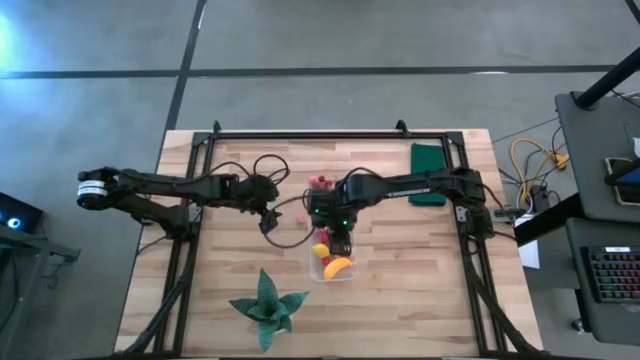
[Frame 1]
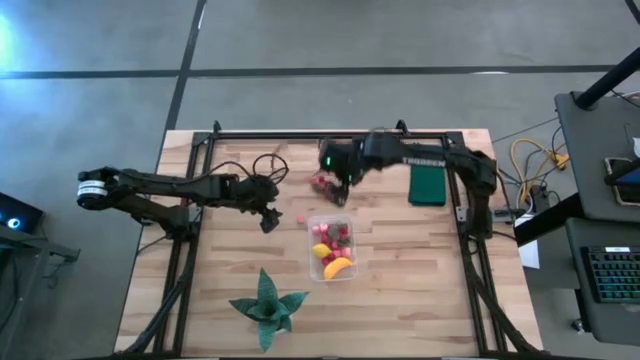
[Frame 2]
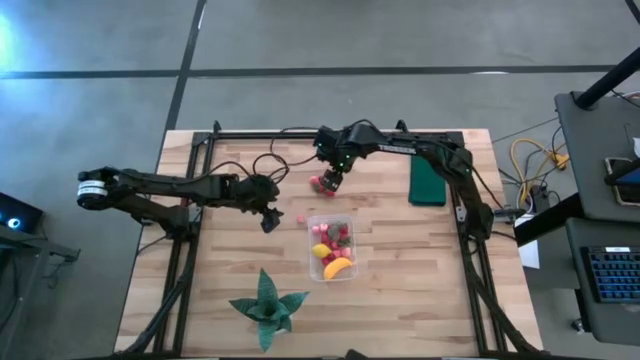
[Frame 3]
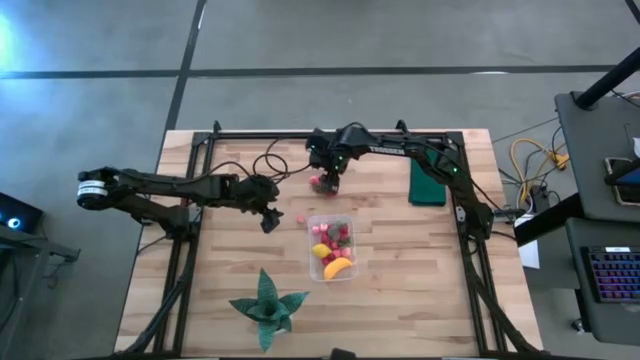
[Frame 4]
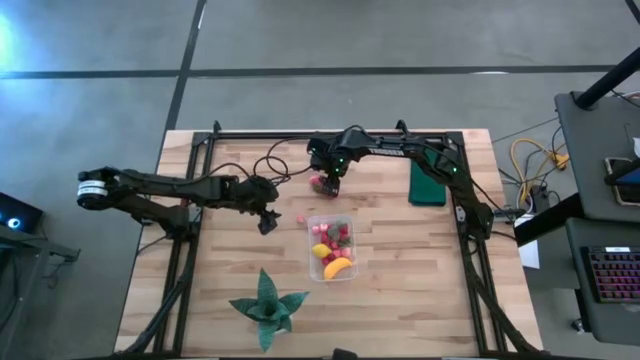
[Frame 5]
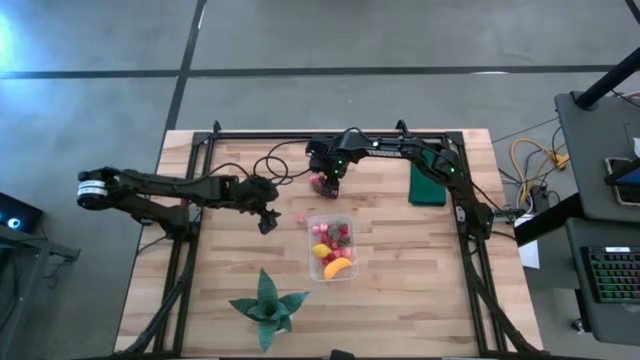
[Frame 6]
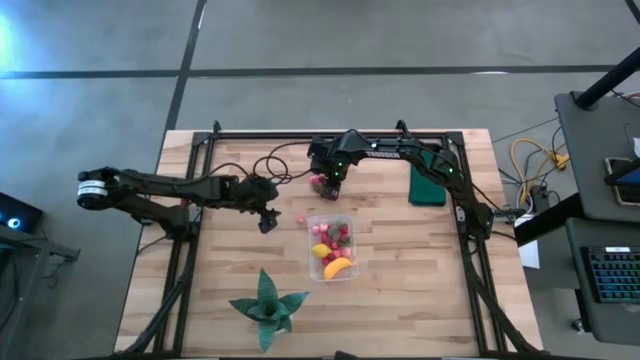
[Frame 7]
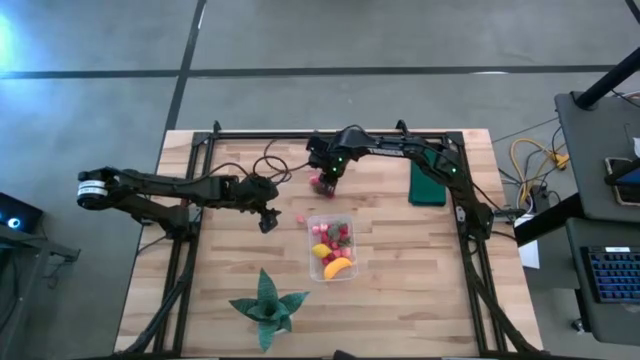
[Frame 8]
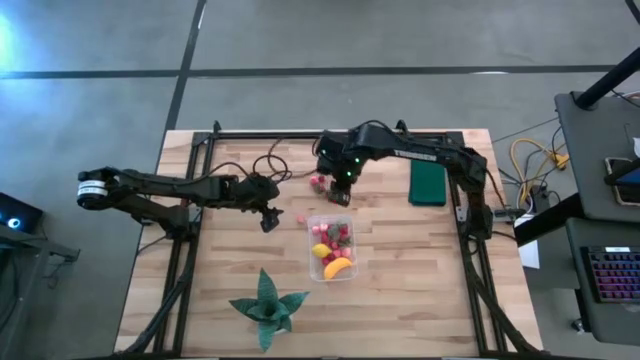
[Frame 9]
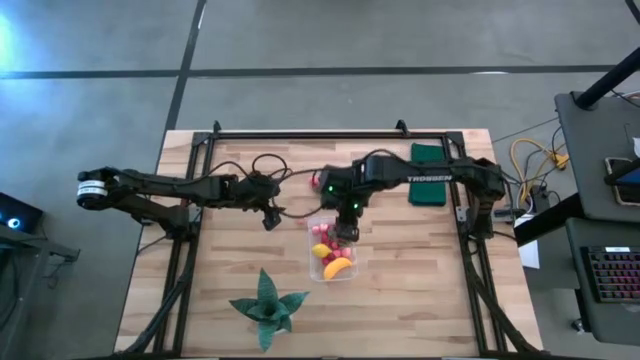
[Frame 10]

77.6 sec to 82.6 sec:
Task: Pick and placing Produce into tupperware
Put the cherry into the transparent bin

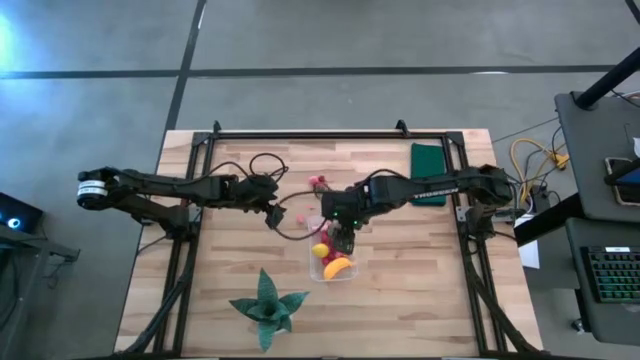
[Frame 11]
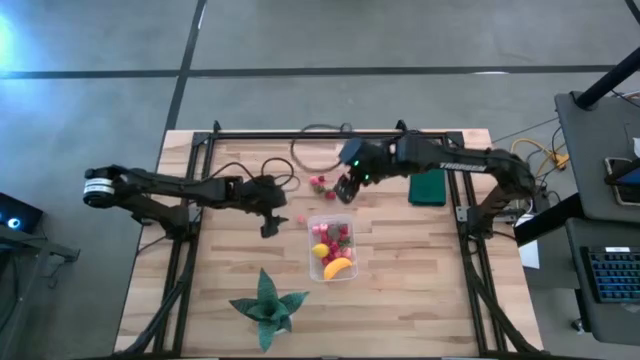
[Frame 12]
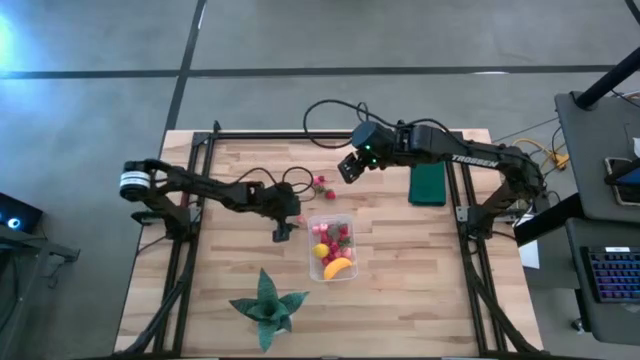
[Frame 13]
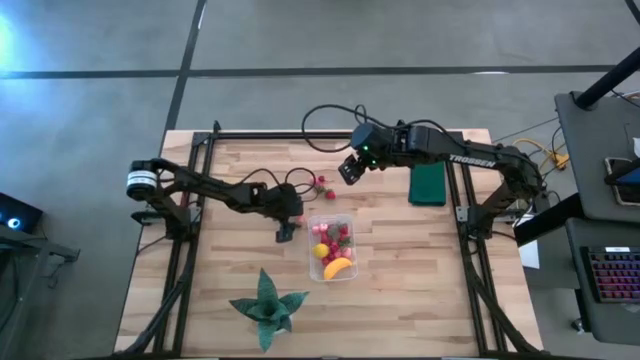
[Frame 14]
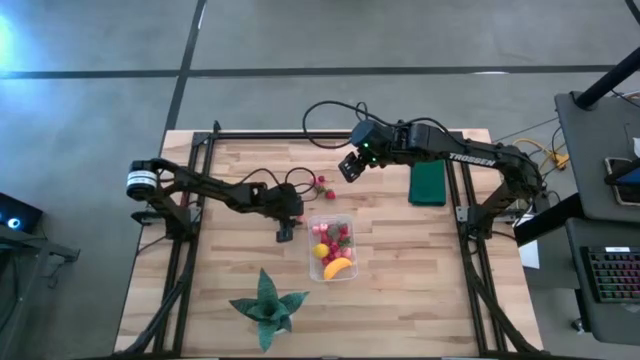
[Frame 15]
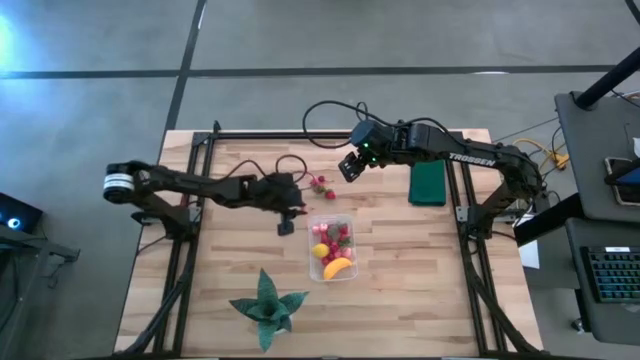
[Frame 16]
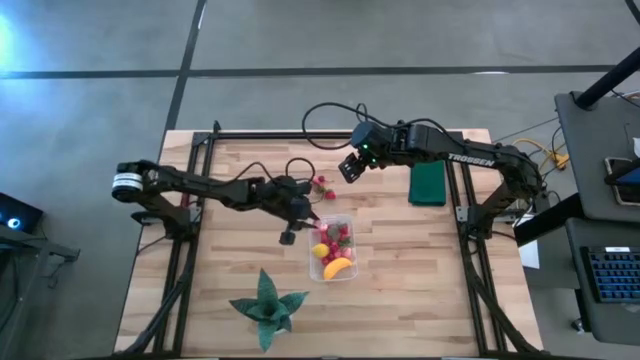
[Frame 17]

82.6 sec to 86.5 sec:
Put the apricot into the transparent bin

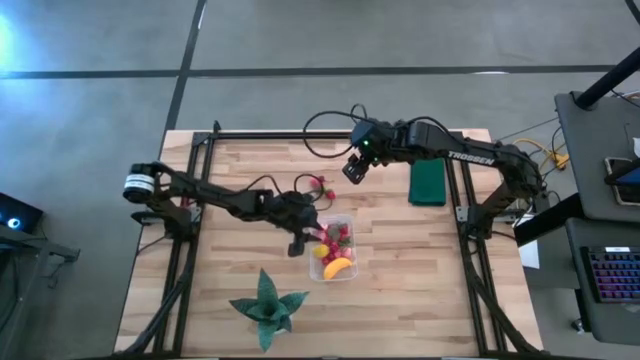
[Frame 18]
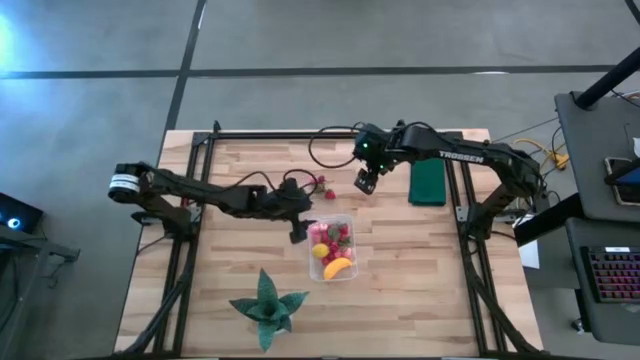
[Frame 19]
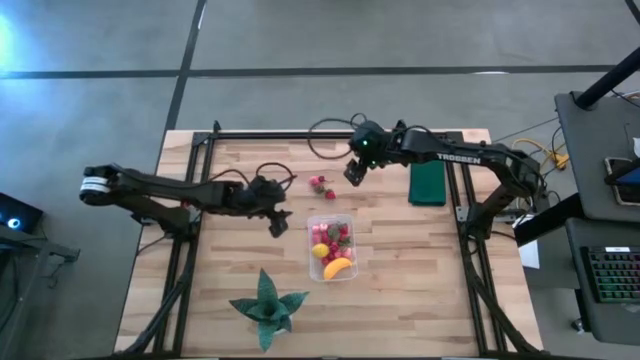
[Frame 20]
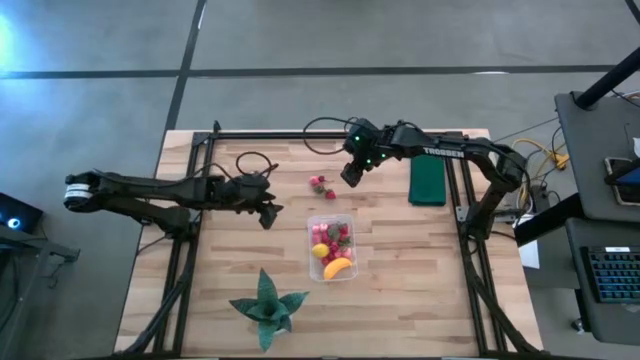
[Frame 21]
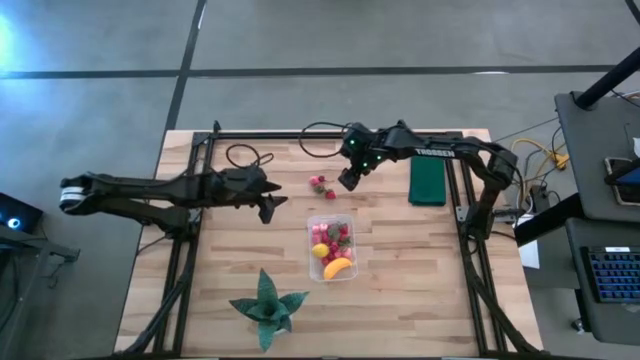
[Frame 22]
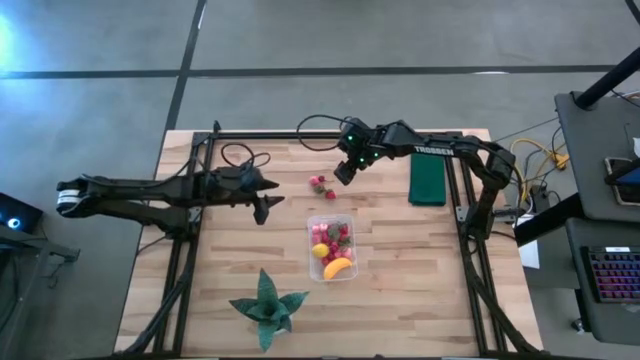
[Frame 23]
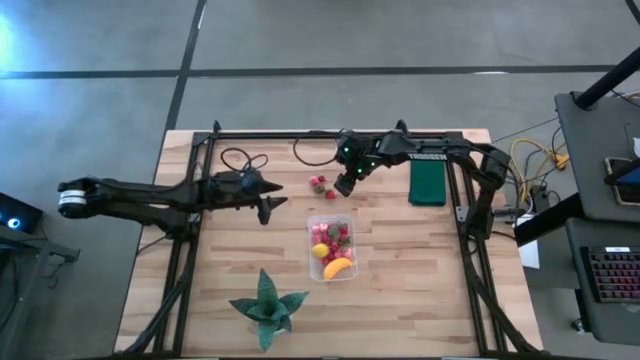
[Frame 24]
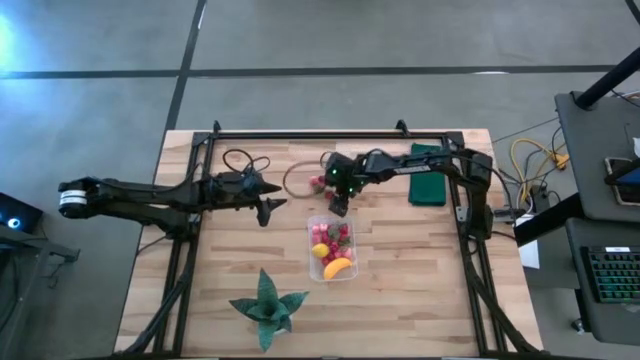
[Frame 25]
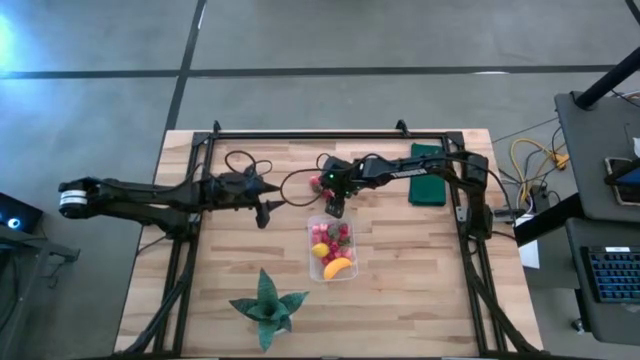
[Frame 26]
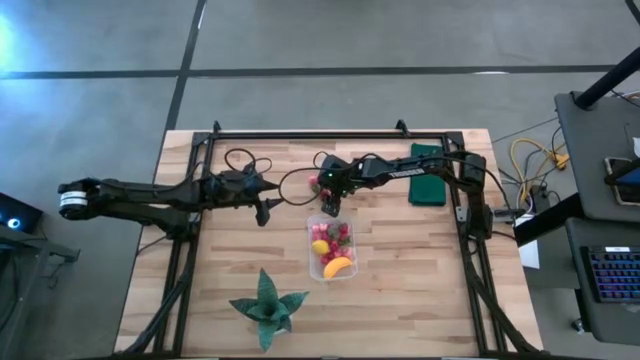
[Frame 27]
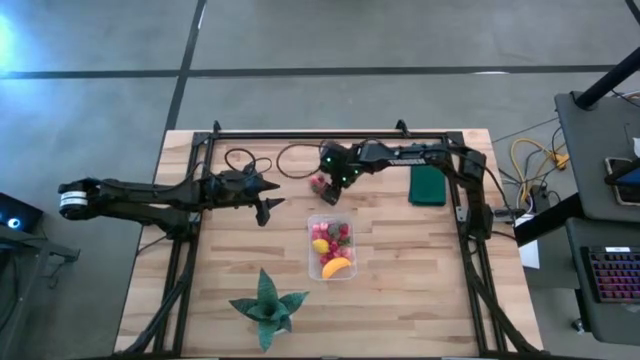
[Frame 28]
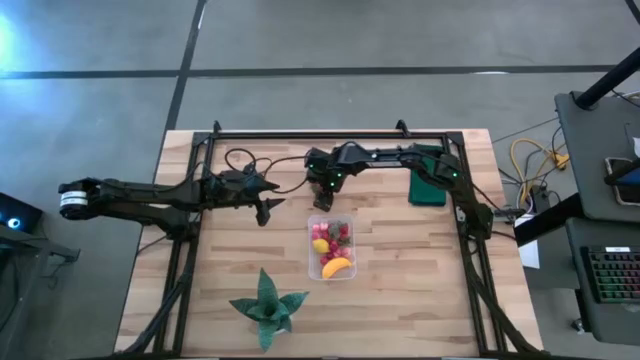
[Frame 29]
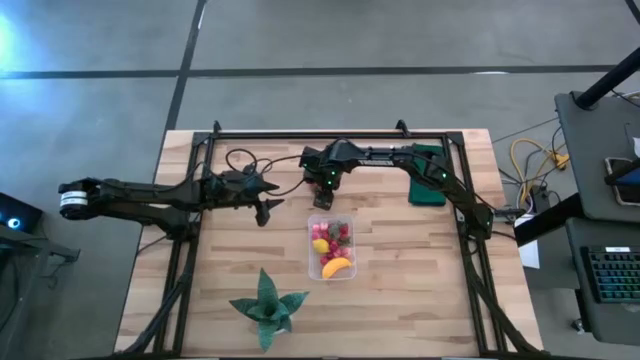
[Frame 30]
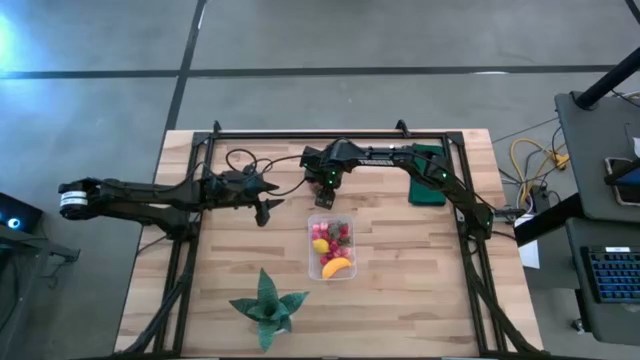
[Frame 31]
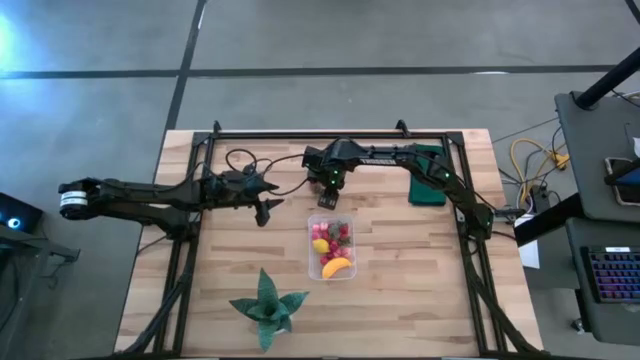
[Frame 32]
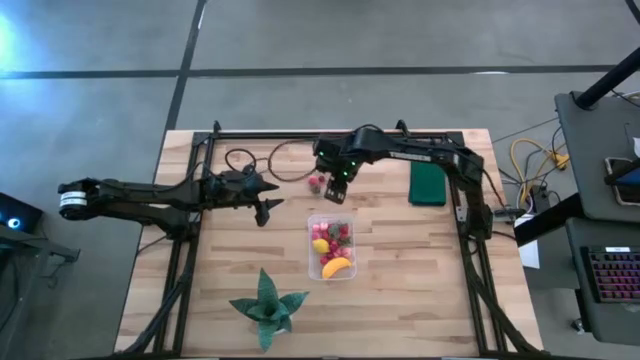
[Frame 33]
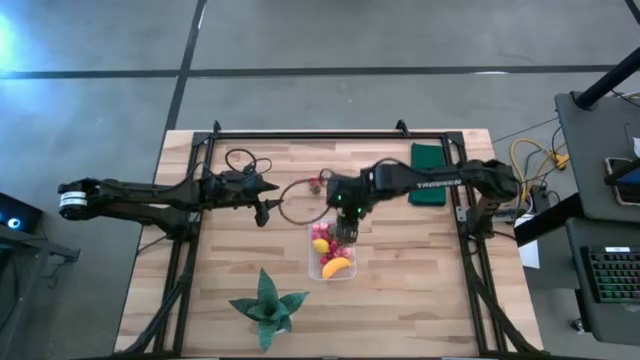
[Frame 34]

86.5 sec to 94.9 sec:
Put the strawberry into the transparent bin

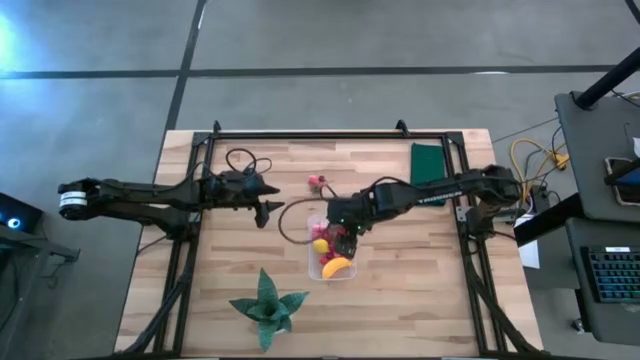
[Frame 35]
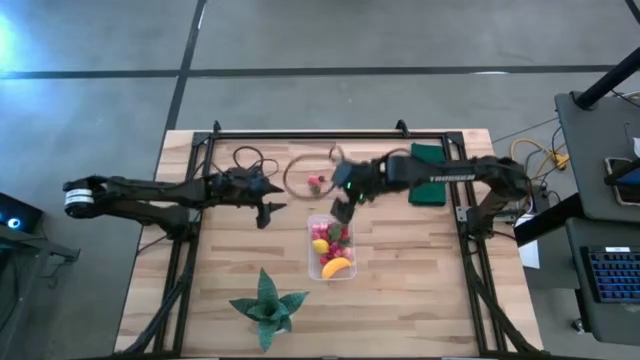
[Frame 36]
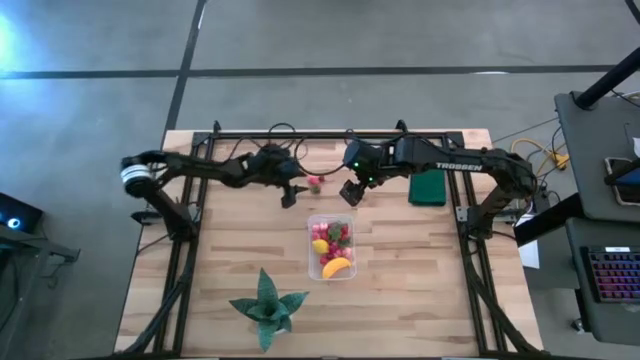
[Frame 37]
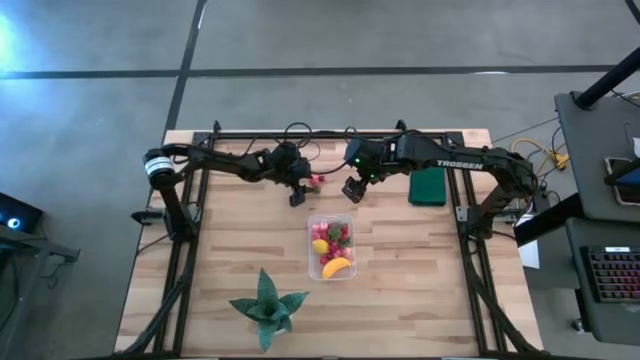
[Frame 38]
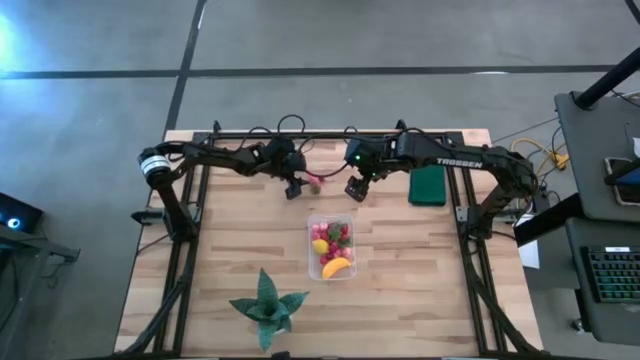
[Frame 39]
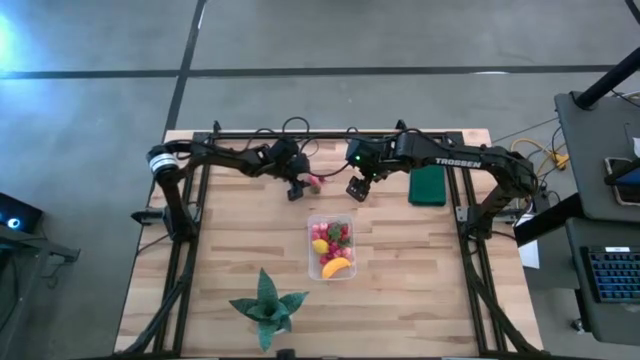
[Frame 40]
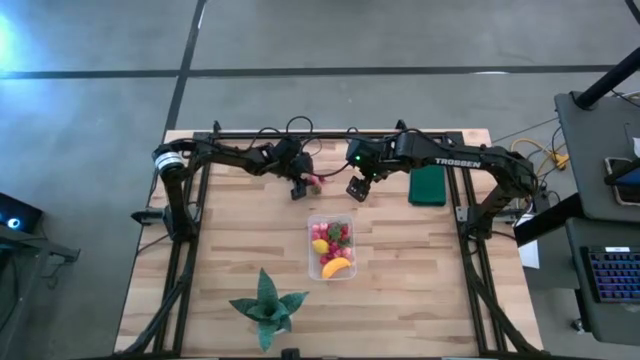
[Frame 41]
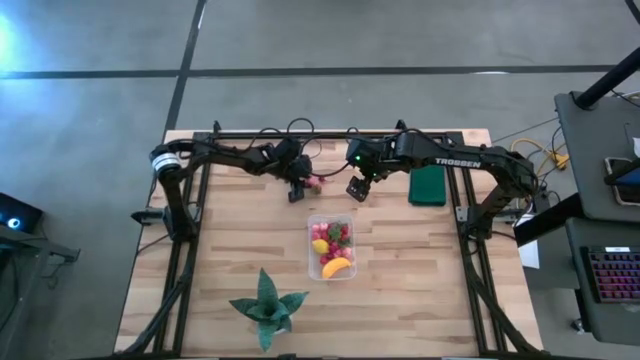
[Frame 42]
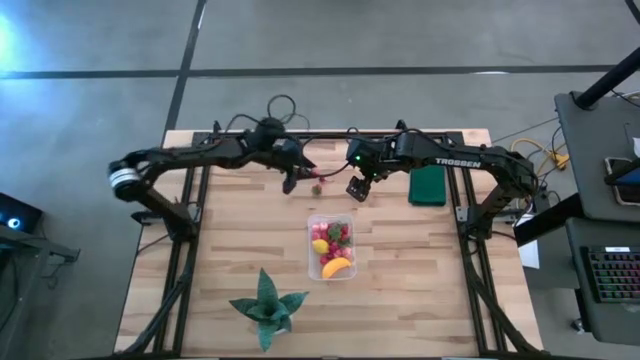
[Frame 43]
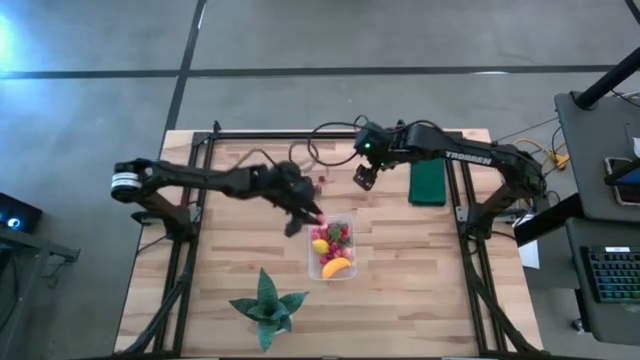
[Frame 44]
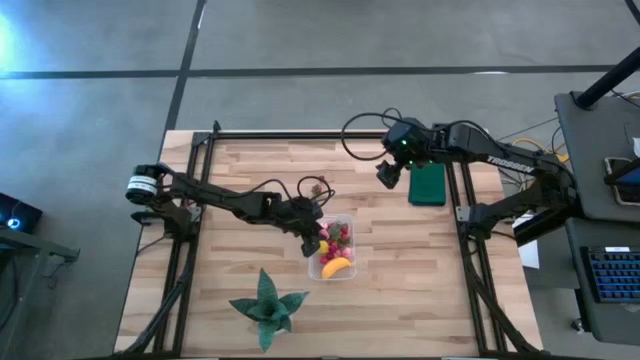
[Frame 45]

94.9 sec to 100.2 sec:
Put the apricot into the transparent bin
